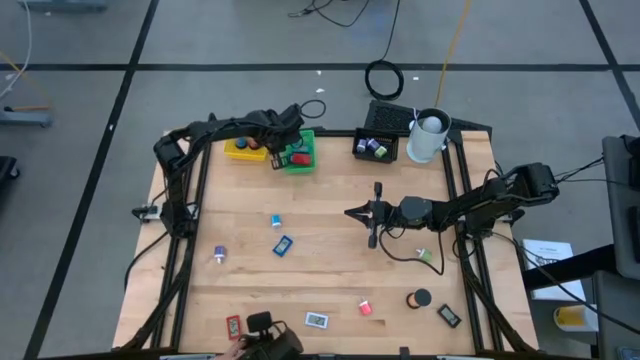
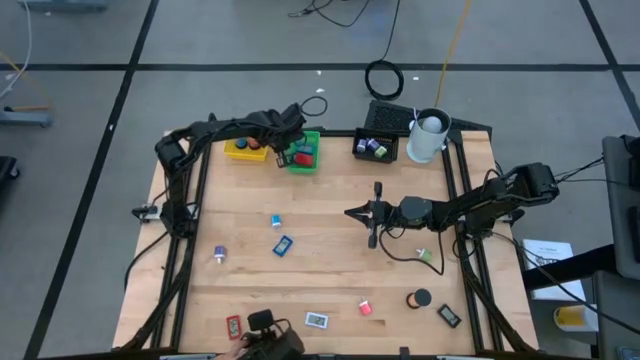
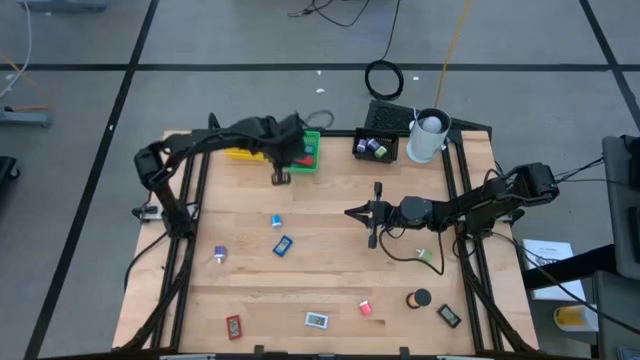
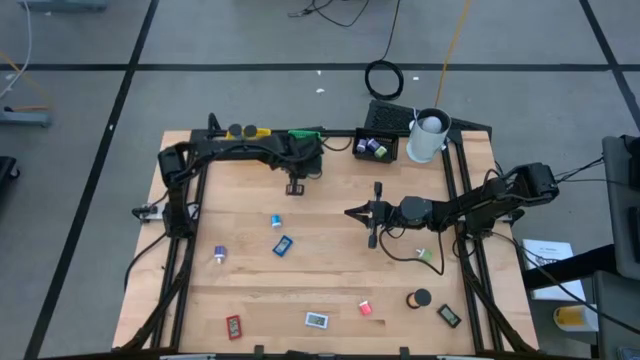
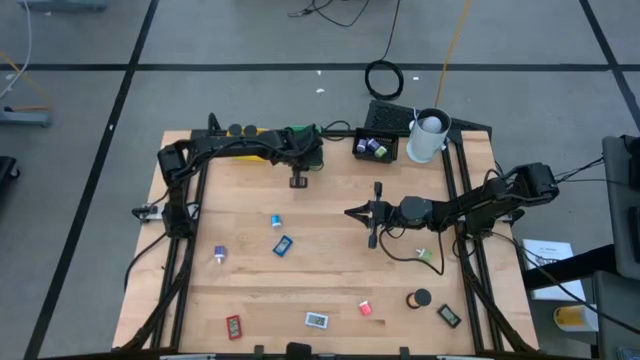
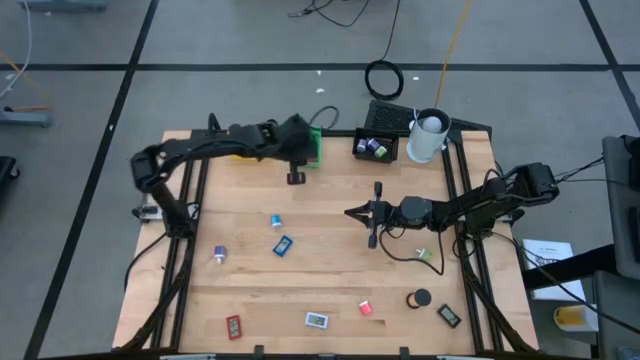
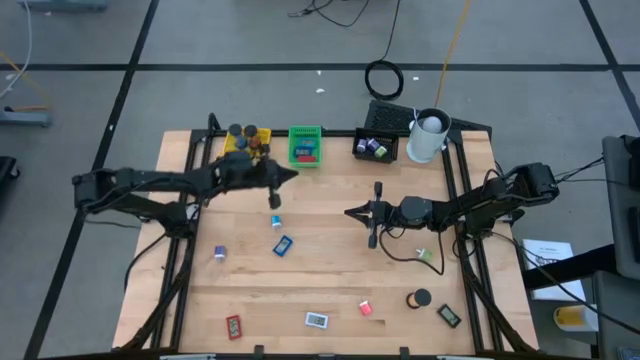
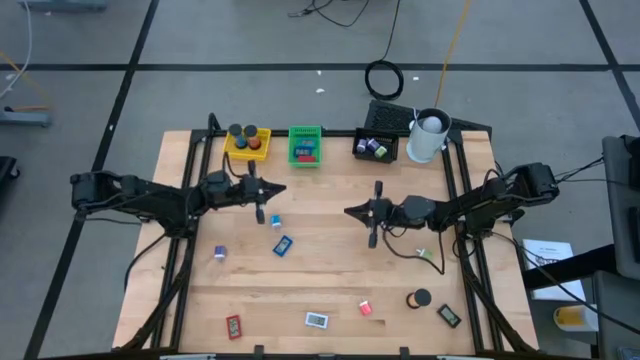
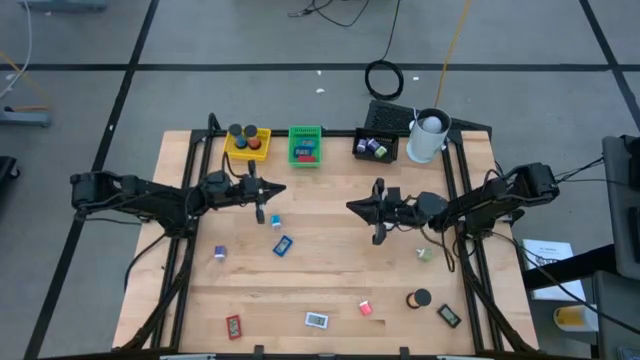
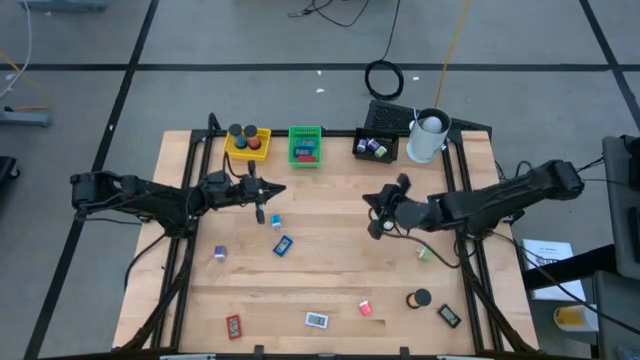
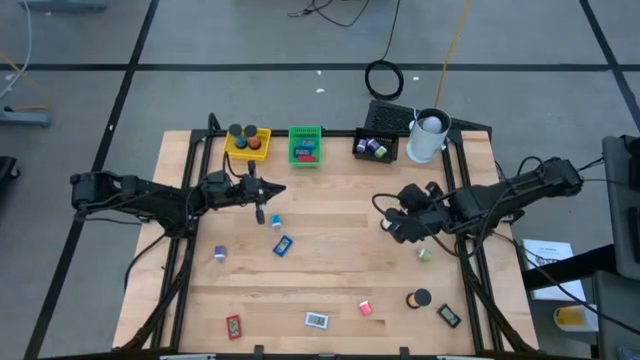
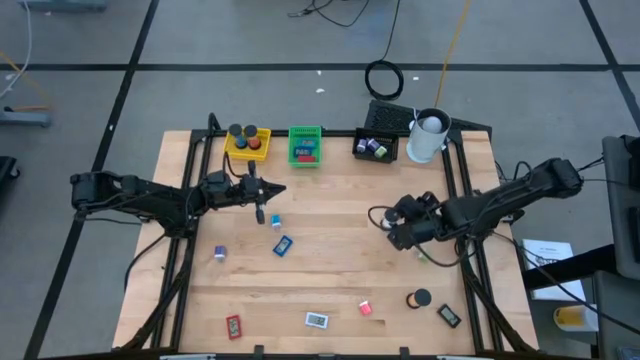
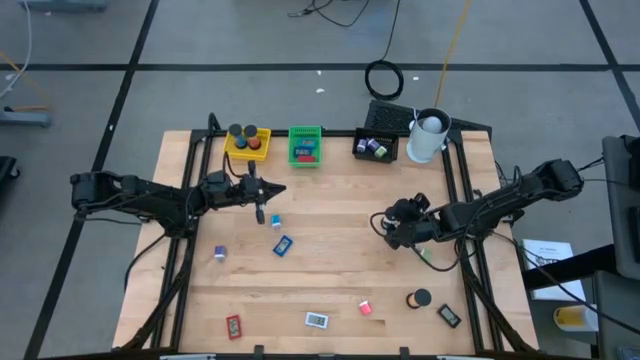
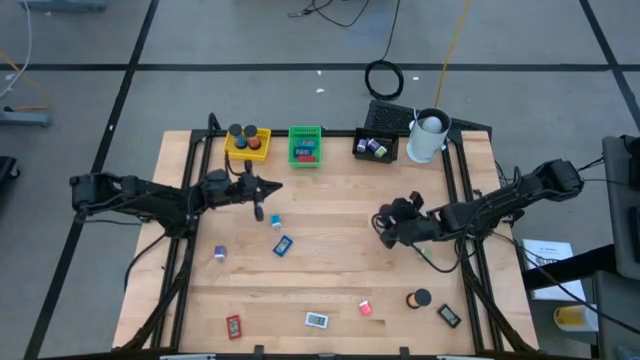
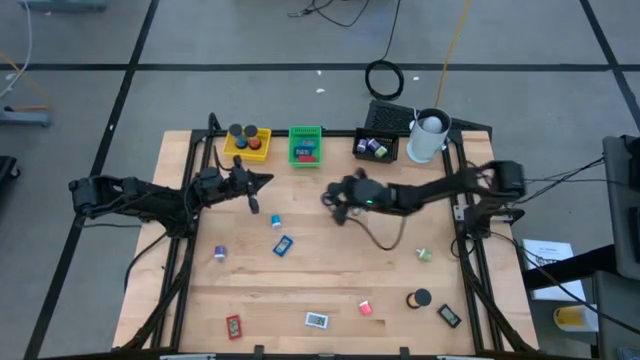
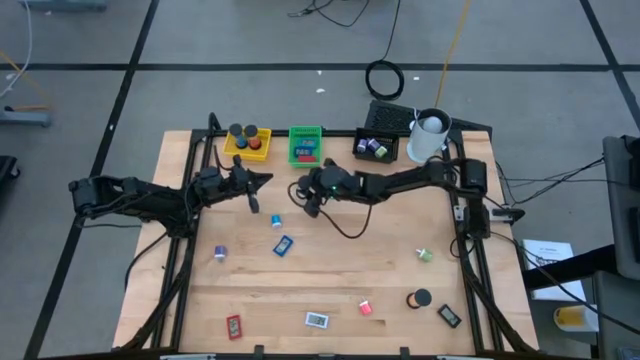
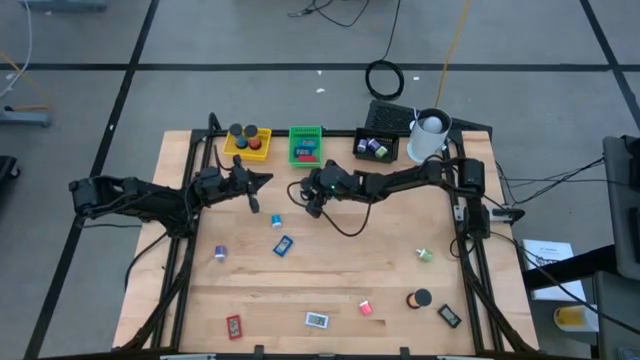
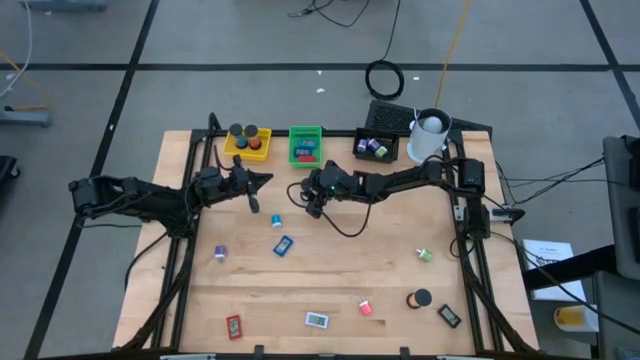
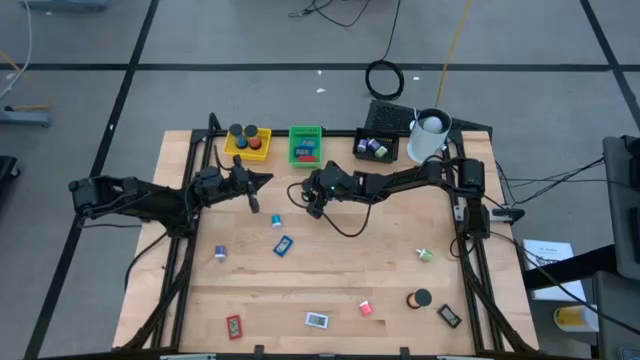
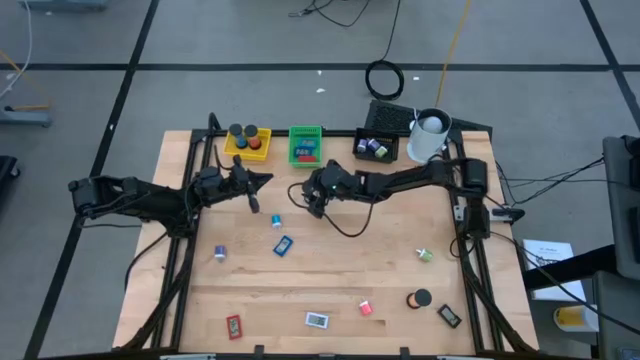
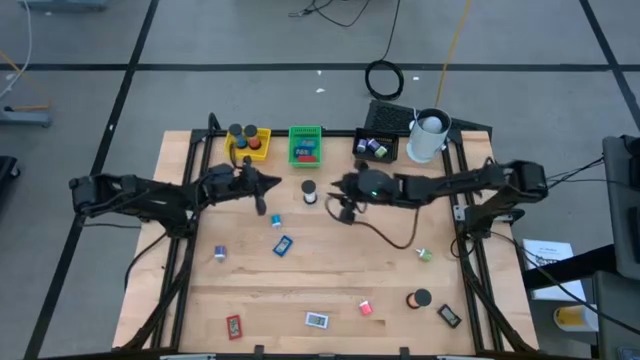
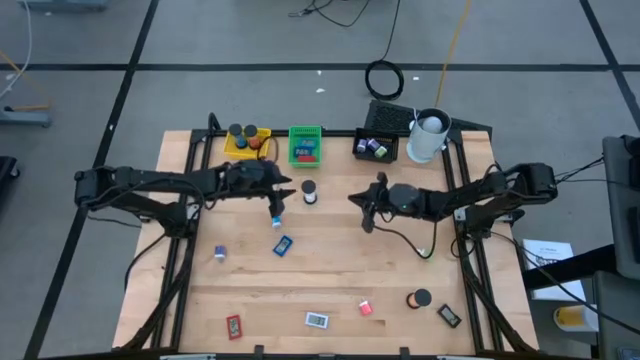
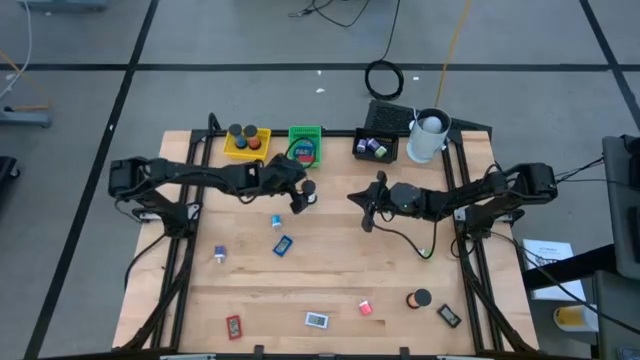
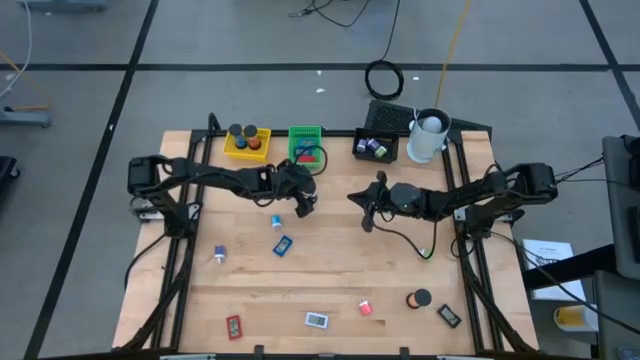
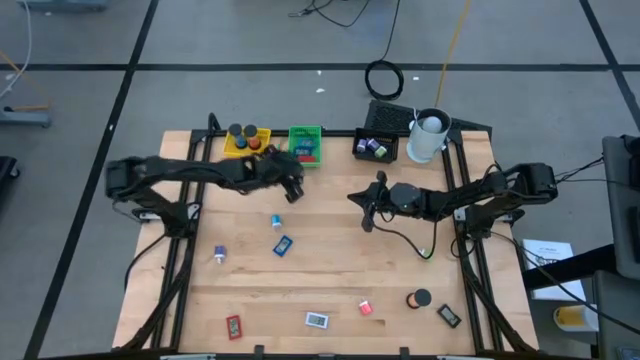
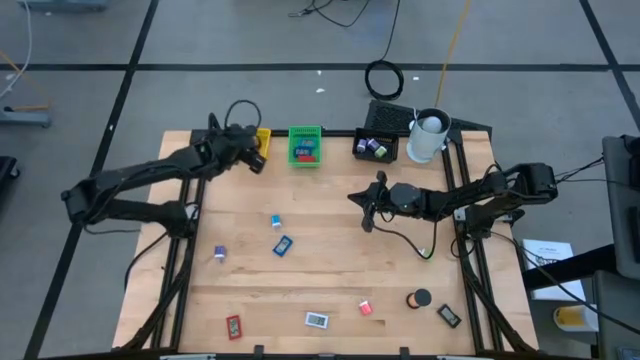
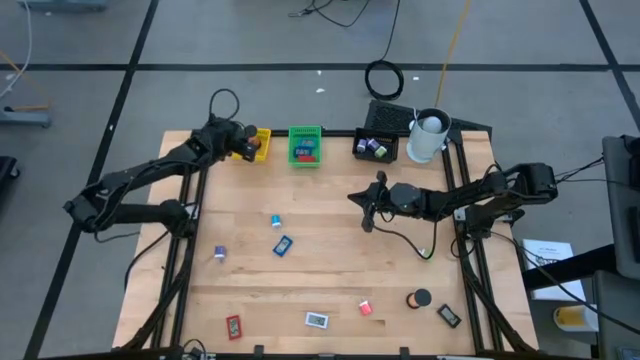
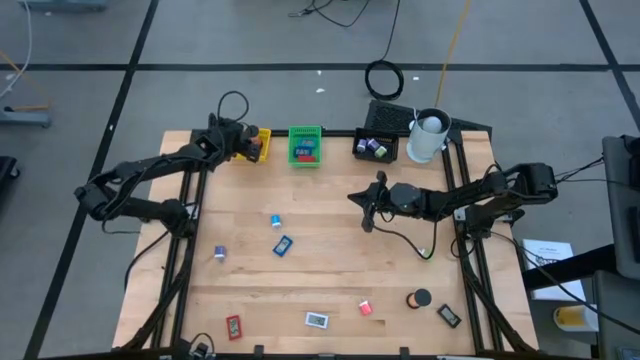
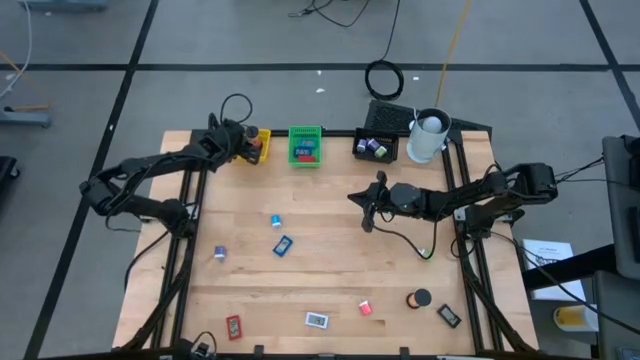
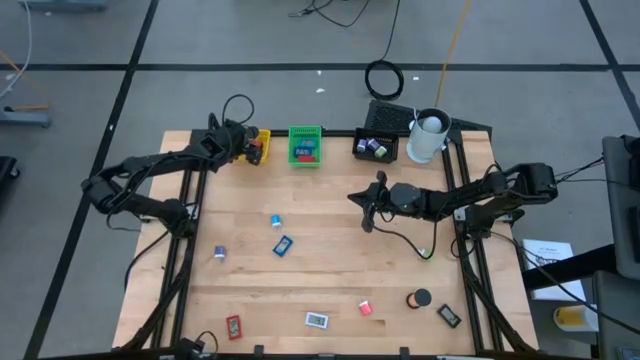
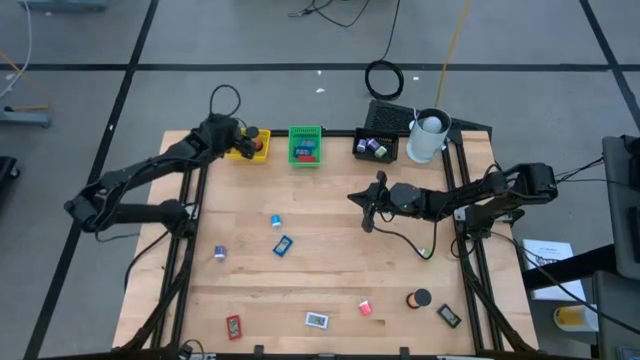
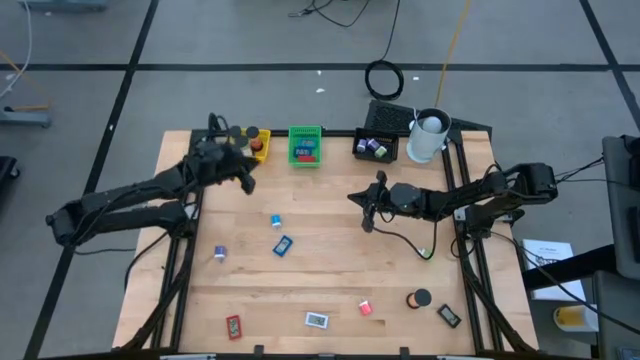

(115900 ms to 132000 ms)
Task: Pick & Place Office items
Put the white sand timer into the yellow bin

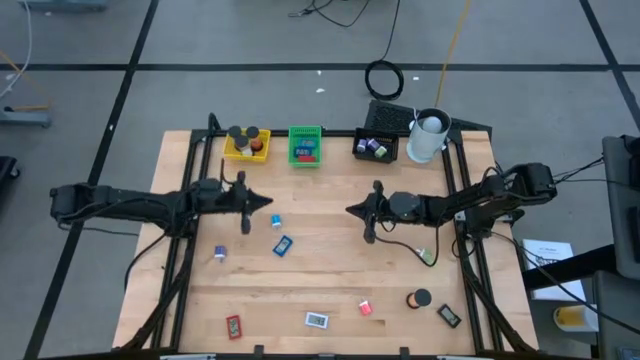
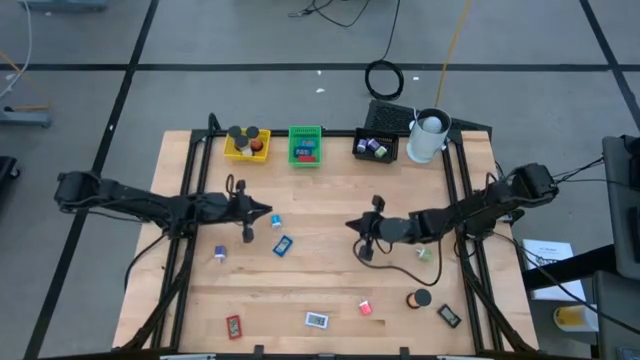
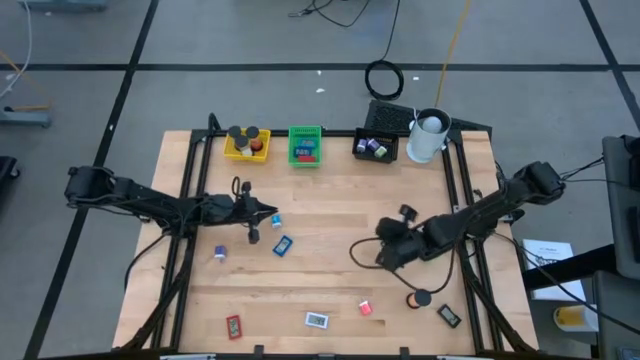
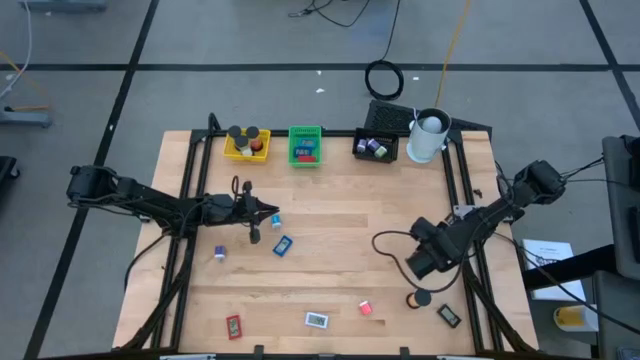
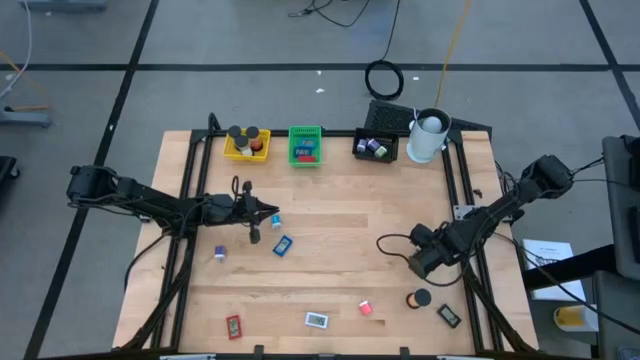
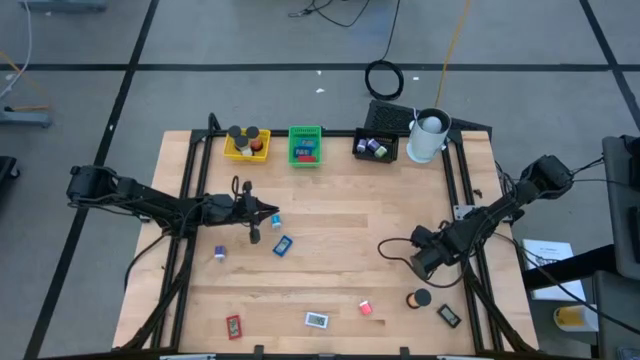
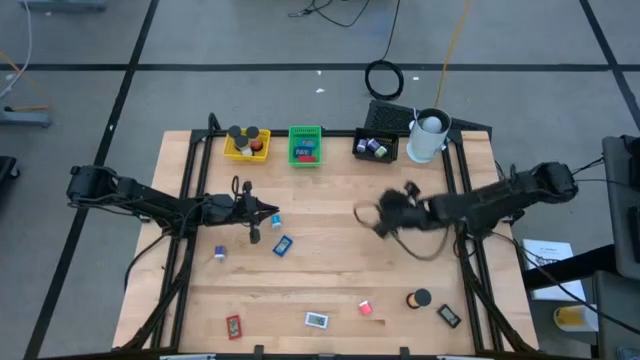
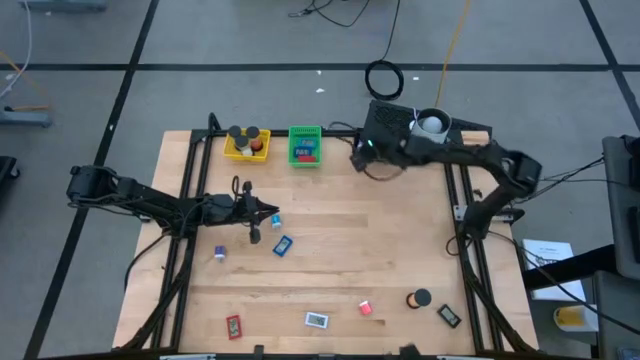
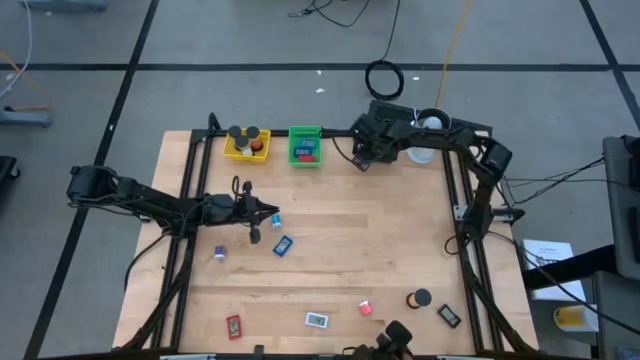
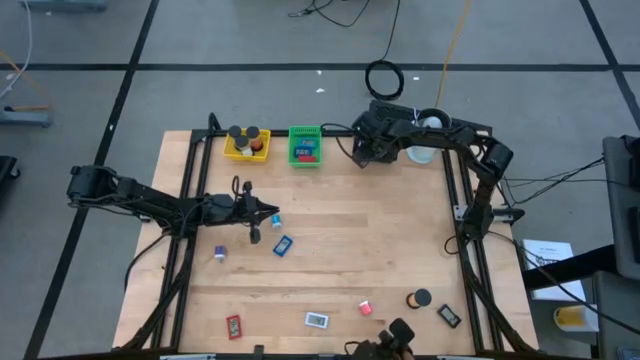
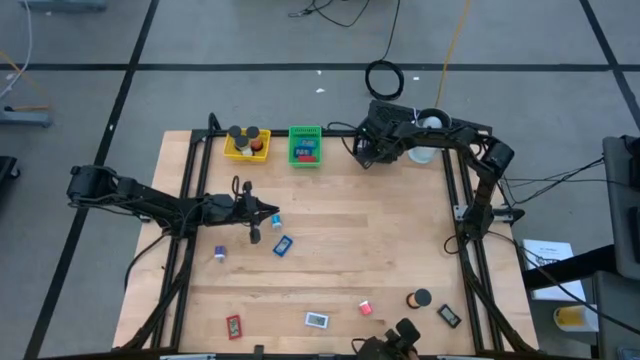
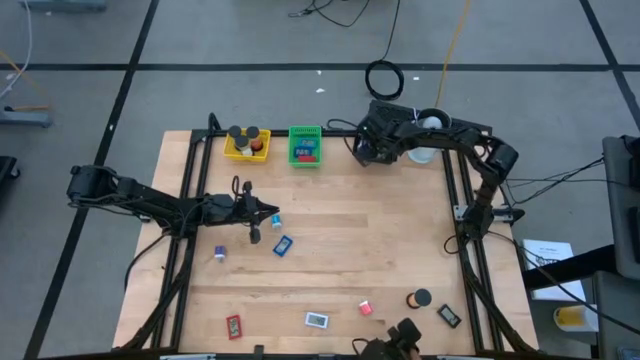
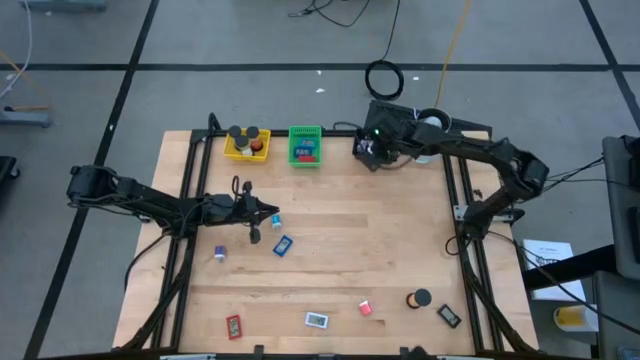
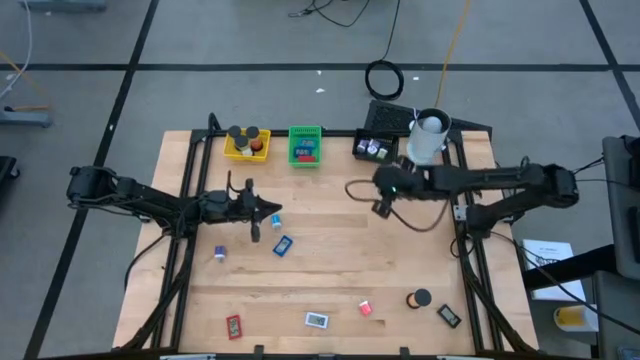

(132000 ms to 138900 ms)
Put the green charger adapter into the black bin
